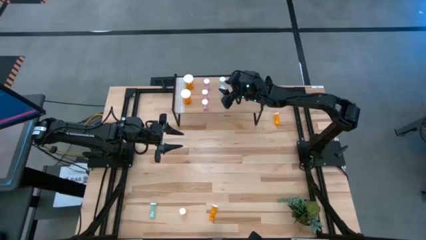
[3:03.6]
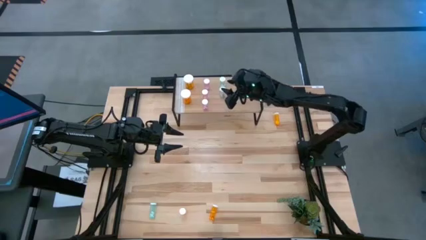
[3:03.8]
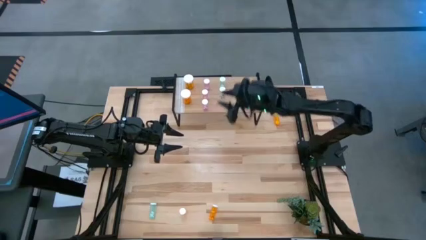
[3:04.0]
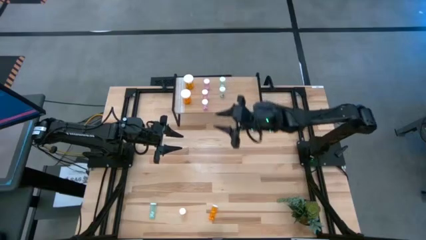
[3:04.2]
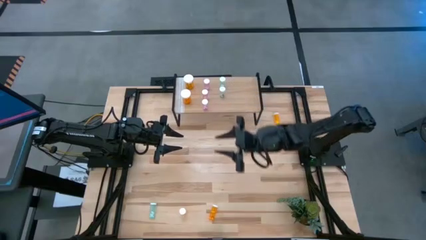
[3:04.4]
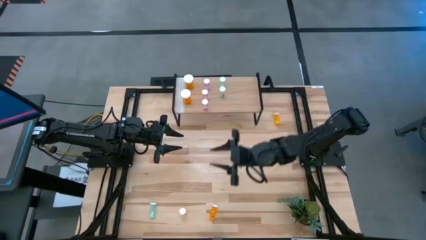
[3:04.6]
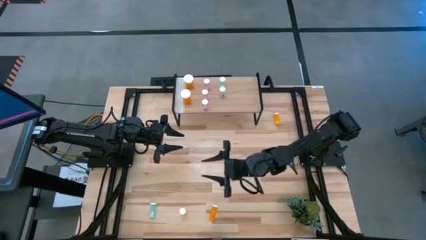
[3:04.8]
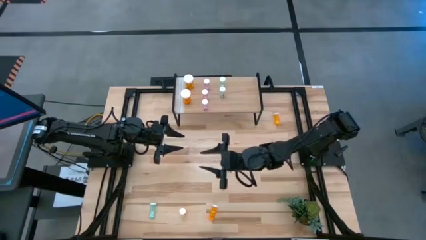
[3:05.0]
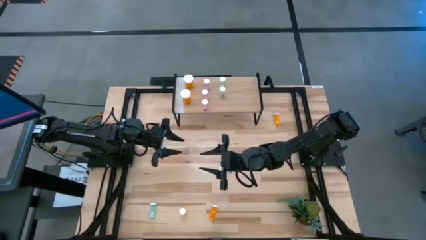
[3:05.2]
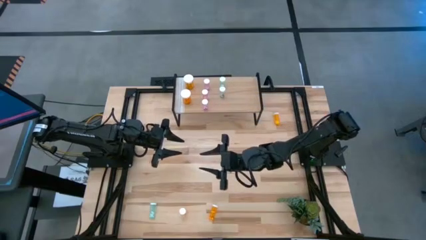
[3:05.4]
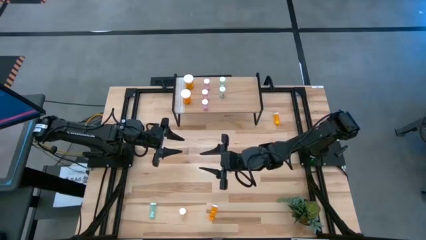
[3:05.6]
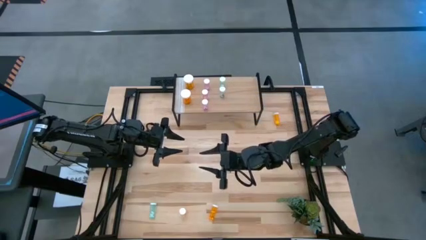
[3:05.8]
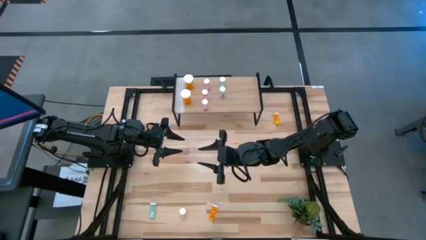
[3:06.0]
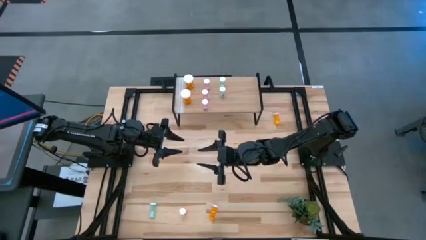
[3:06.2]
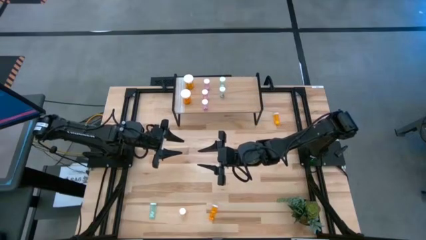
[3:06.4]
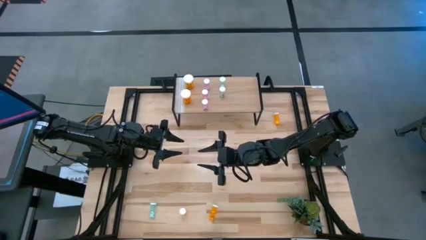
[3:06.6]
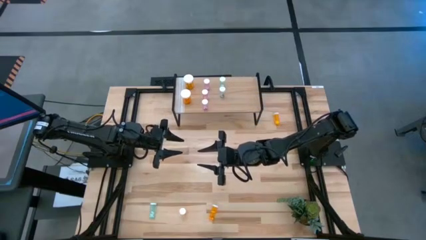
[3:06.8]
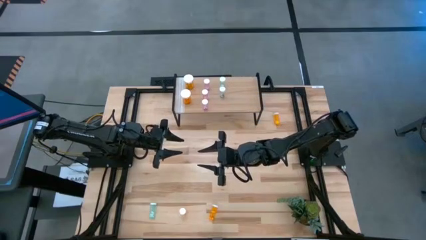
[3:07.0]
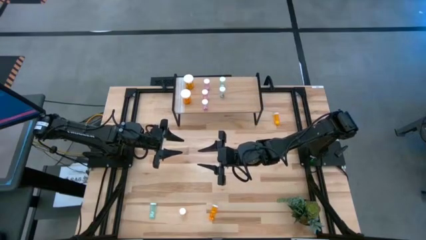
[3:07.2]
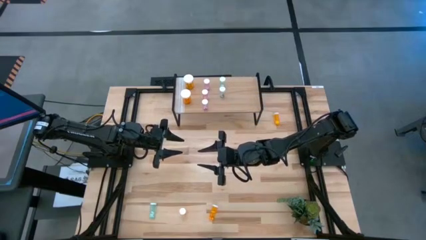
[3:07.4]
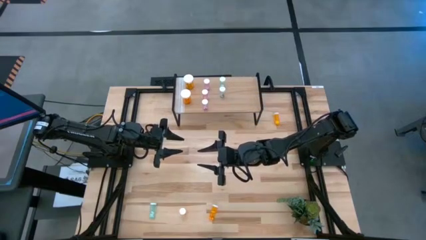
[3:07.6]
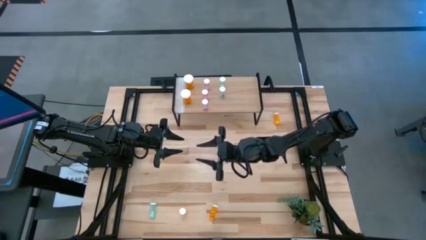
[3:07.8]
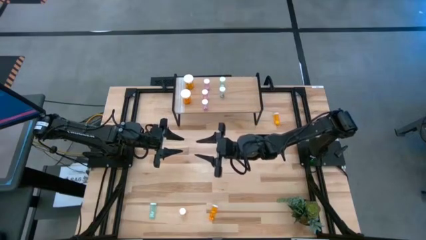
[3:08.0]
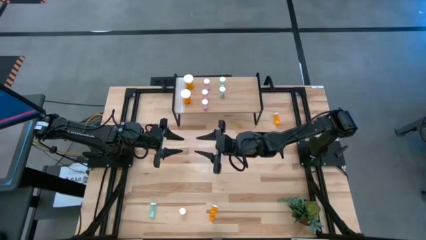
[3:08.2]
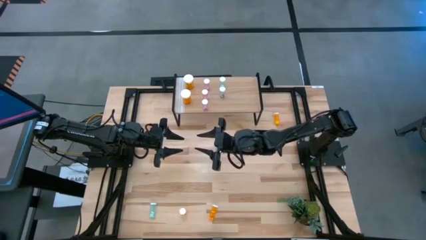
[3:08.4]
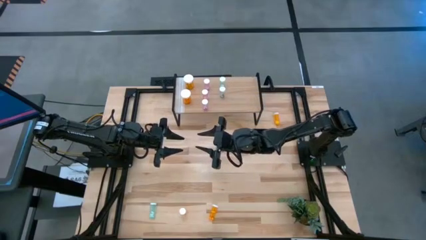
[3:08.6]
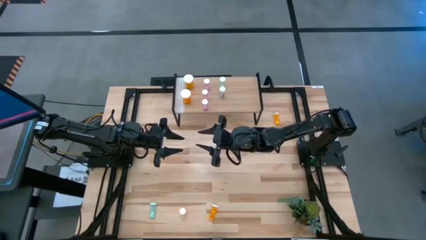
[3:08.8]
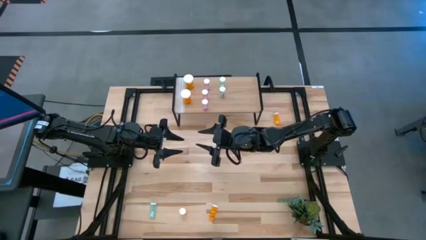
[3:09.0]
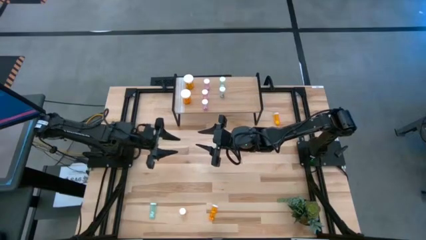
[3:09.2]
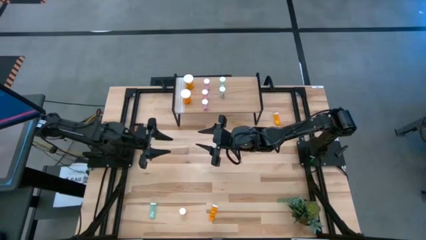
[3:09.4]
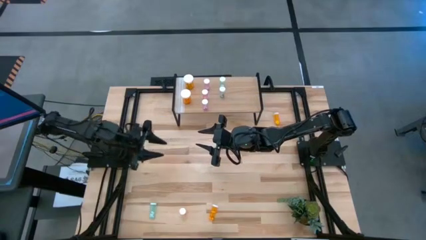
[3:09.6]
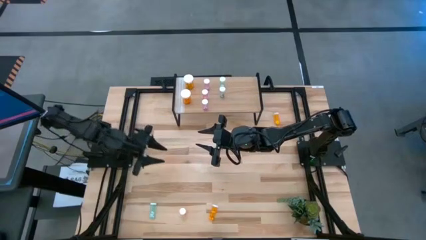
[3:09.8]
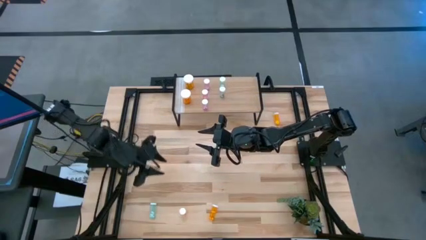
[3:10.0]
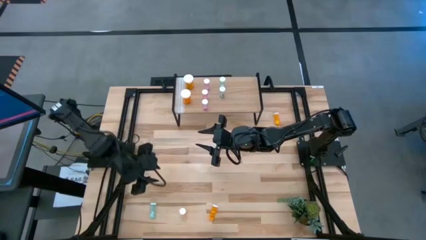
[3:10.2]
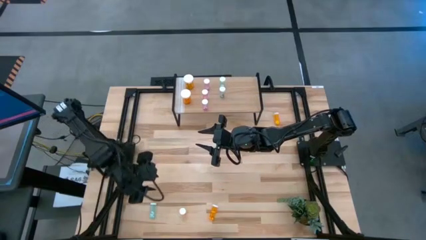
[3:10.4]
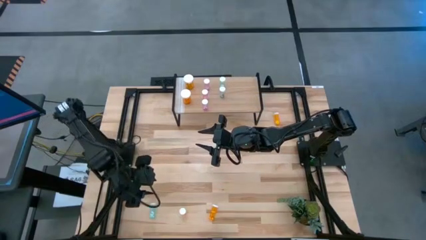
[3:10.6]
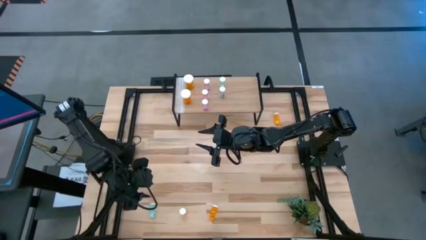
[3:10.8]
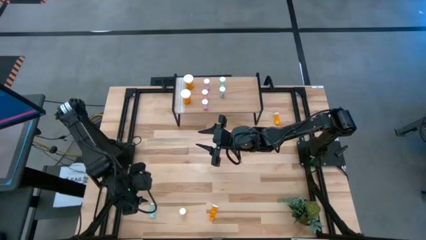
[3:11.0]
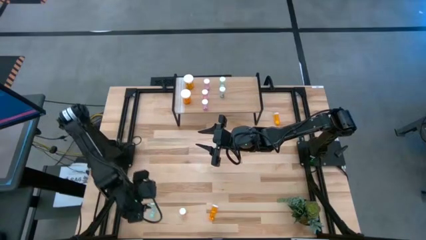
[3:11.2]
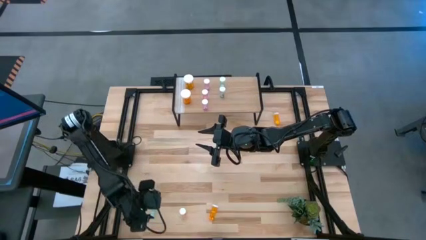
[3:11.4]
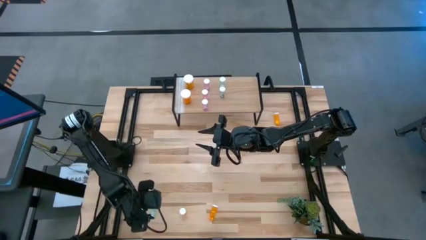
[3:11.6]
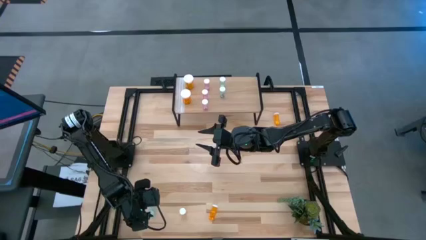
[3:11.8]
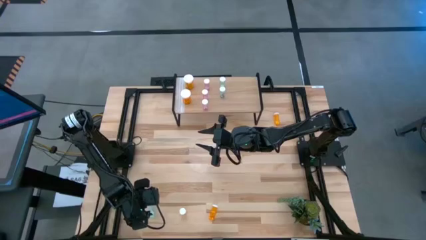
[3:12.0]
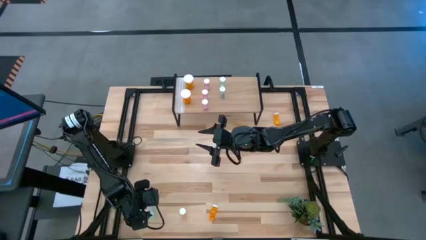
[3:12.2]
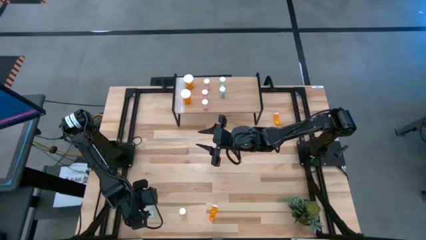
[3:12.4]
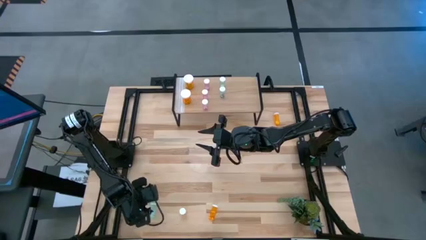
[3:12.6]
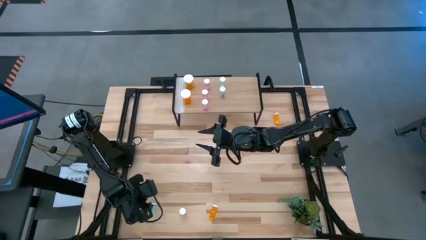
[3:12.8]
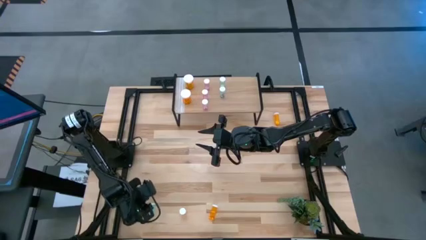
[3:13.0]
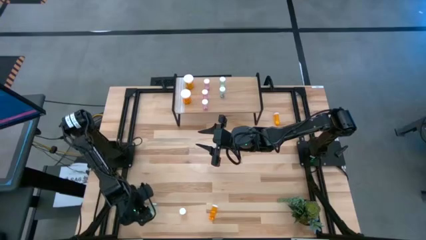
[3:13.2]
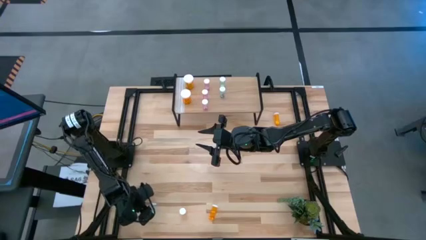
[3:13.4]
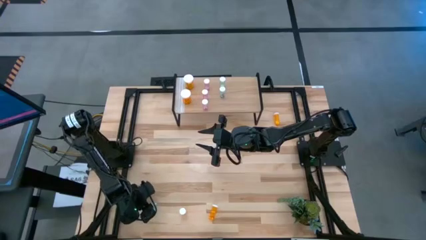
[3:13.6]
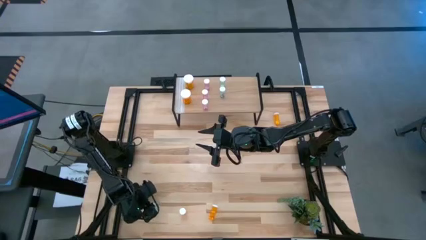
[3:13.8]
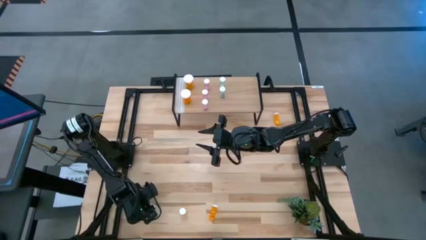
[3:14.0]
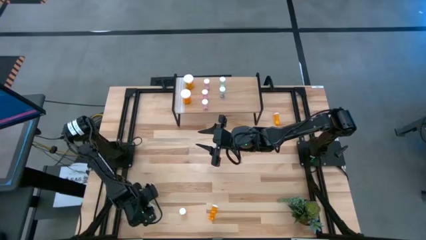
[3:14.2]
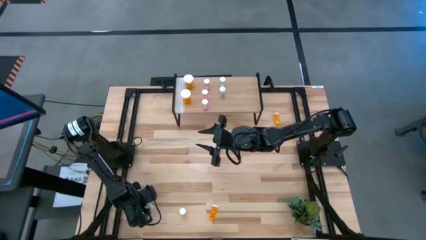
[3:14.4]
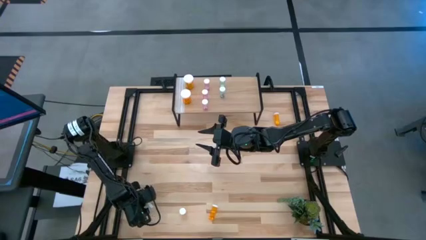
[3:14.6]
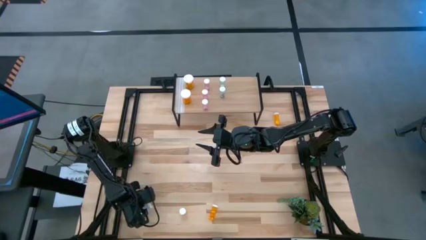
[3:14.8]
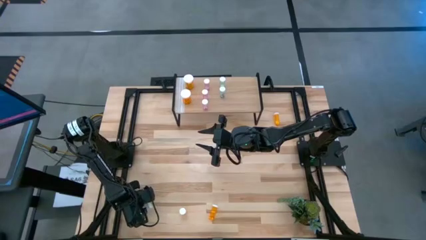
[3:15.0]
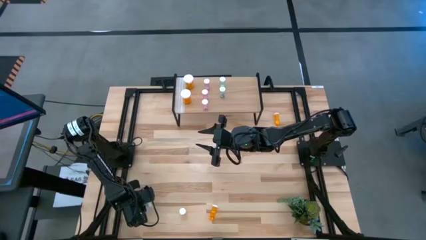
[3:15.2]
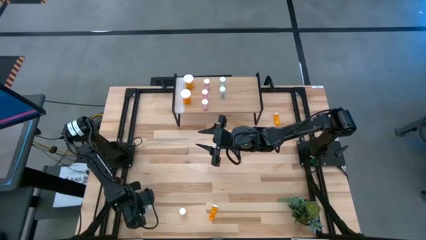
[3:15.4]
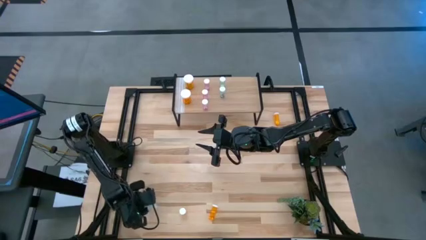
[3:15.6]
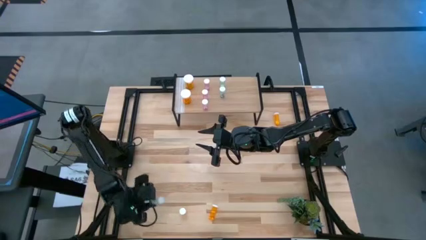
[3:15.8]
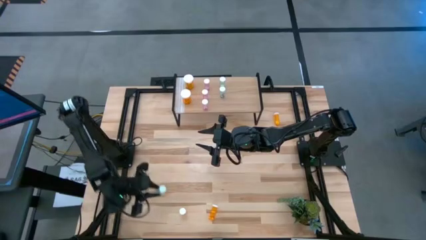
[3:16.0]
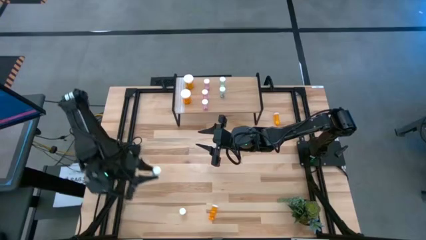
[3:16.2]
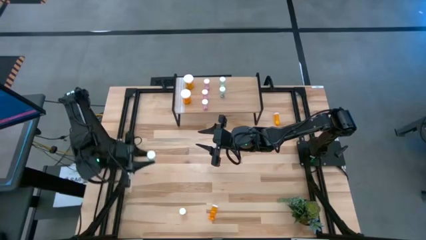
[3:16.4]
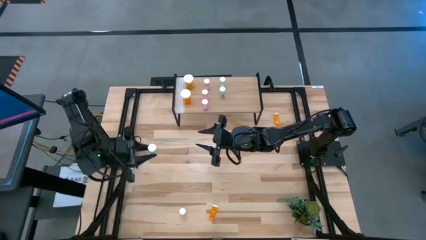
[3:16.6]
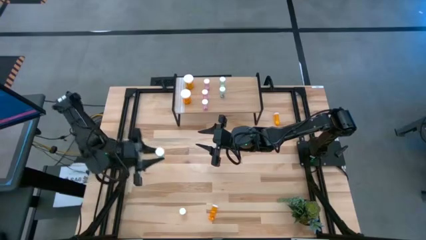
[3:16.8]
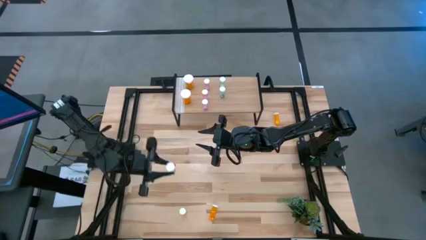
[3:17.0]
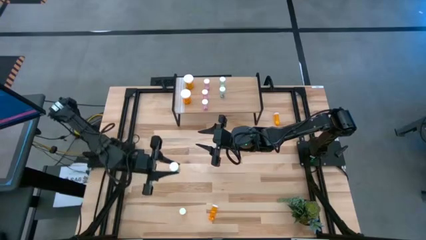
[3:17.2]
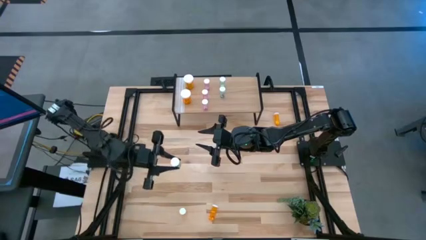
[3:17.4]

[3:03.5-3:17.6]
Task: Pick and place medicine bottles onto shelf by color
Put the small blue pill bottle aligned with other small blue pill bottles on the shelf

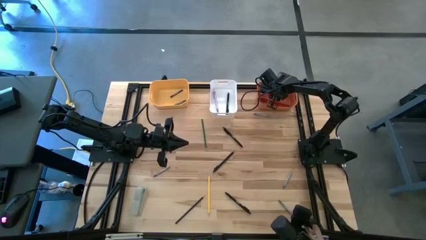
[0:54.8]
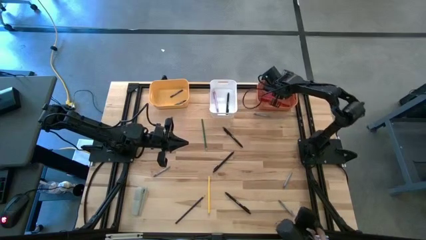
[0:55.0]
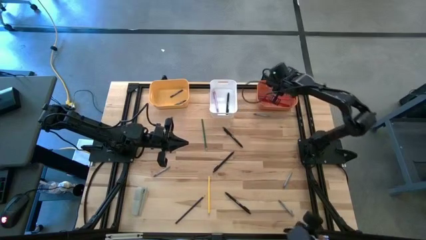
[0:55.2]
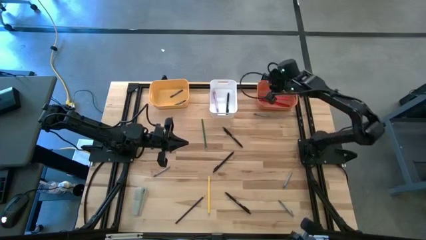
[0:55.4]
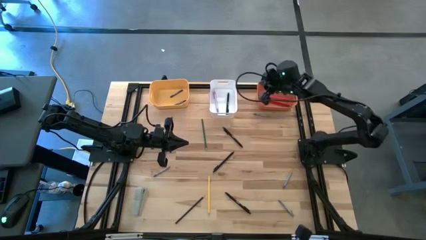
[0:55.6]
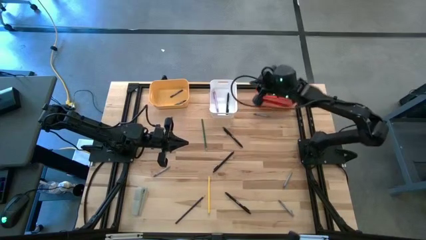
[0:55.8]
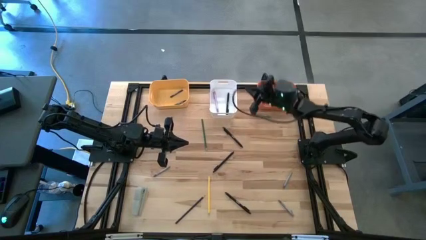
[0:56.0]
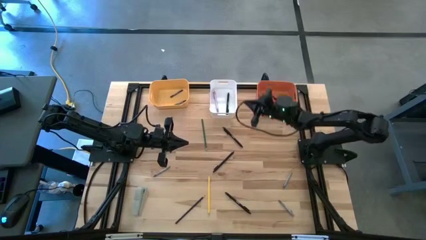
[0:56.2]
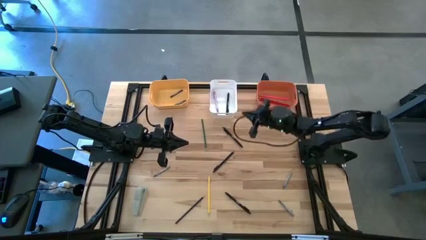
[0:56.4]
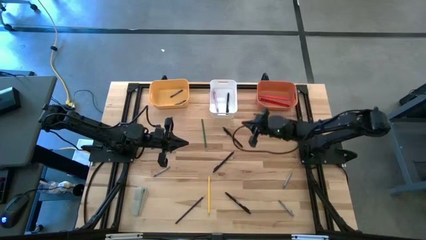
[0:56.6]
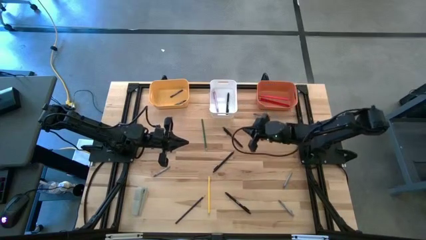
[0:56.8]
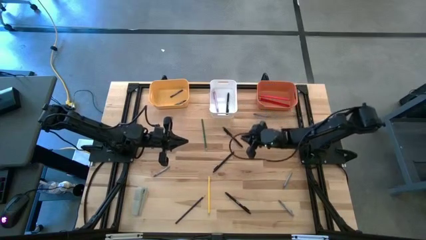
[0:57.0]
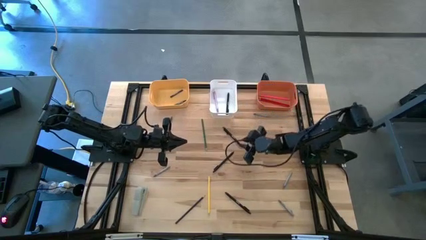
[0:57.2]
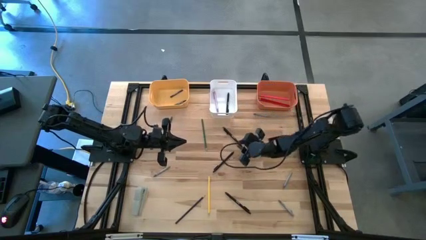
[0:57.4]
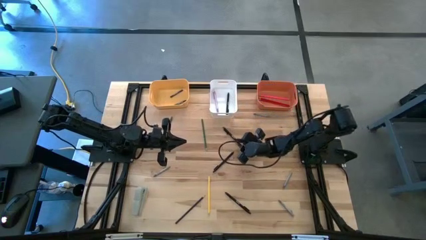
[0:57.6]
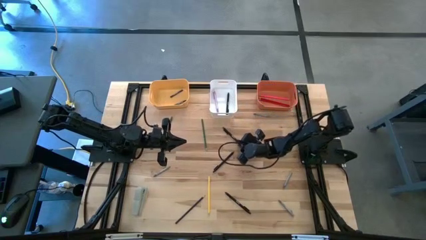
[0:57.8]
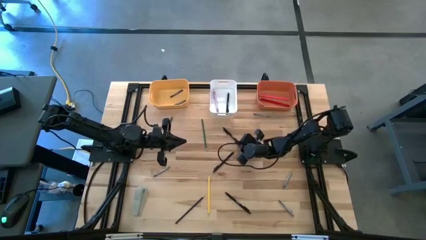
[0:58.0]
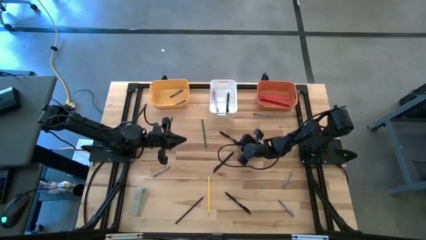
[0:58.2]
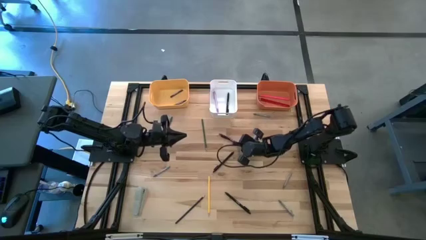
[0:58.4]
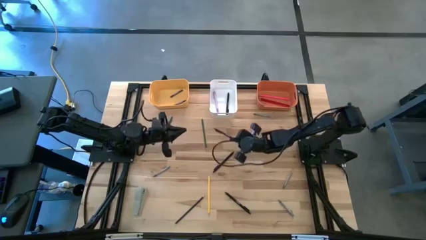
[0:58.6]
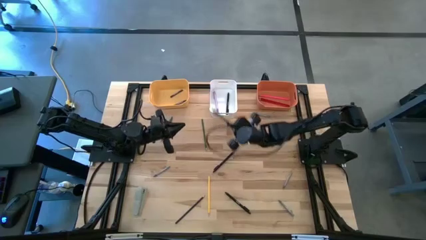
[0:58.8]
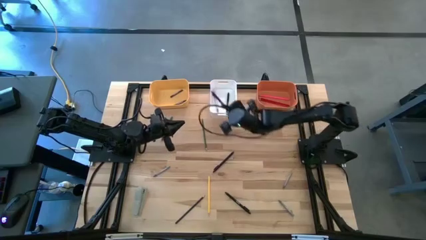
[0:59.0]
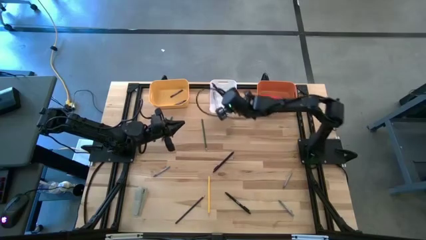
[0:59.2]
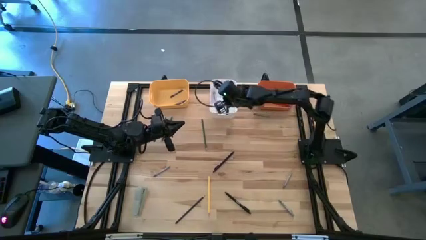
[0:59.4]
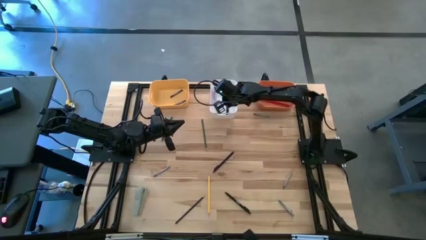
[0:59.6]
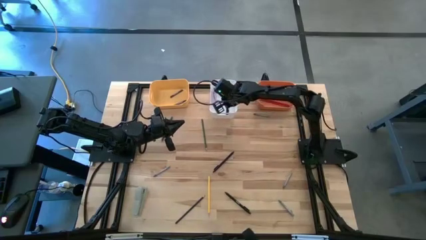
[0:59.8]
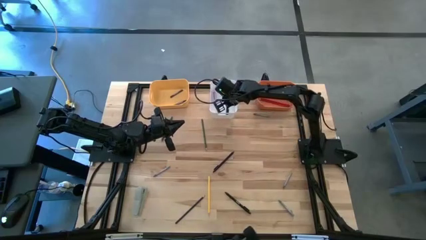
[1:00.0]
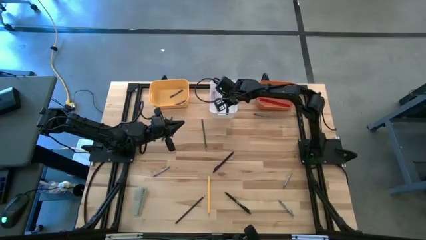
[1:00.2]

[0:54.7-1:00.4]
Task: Sort crayons/erasers/pens/pencils in bins
Put the black pen into the white bin
